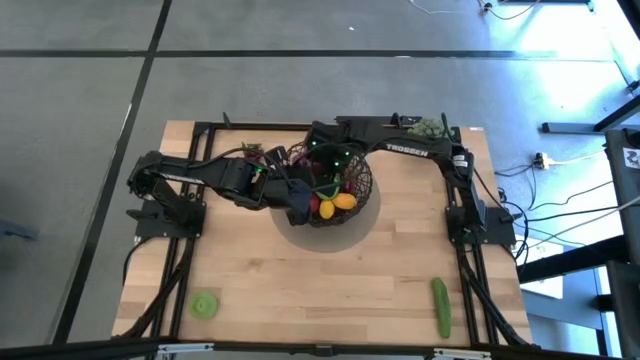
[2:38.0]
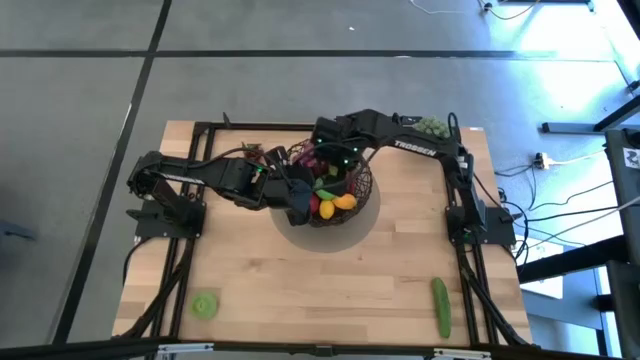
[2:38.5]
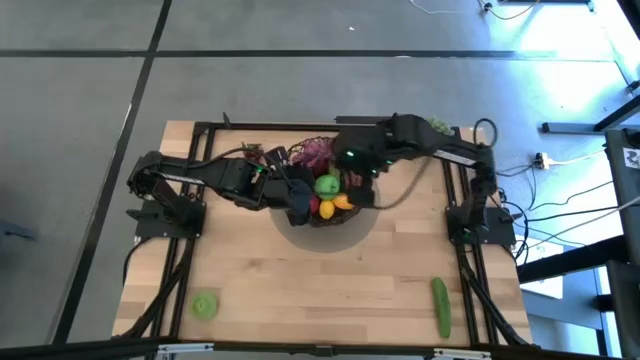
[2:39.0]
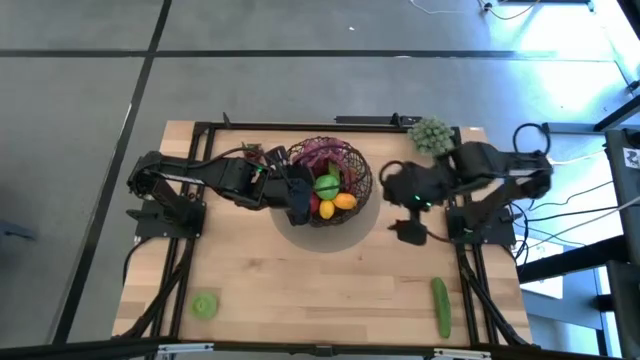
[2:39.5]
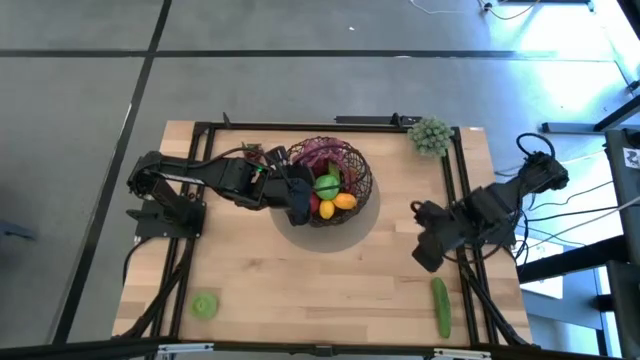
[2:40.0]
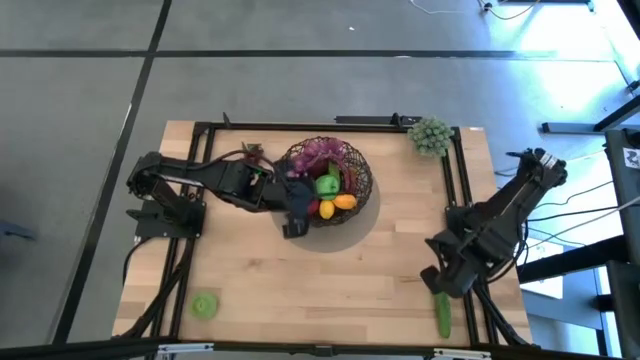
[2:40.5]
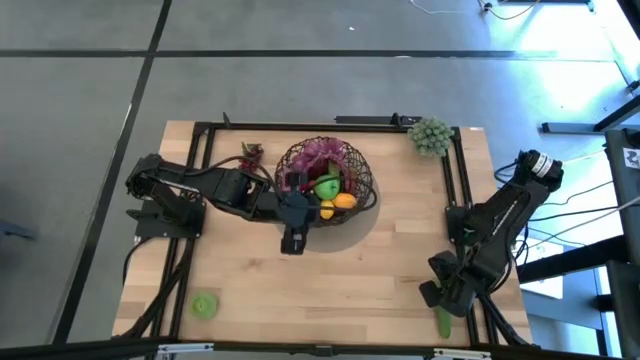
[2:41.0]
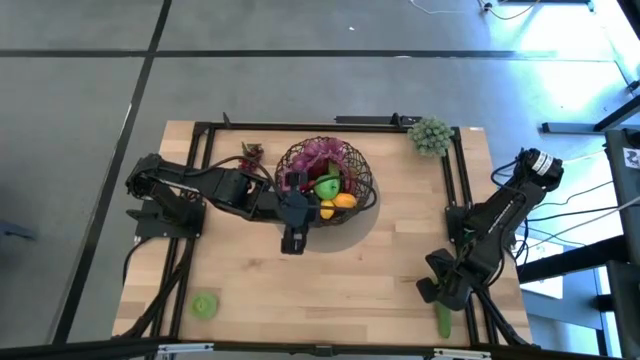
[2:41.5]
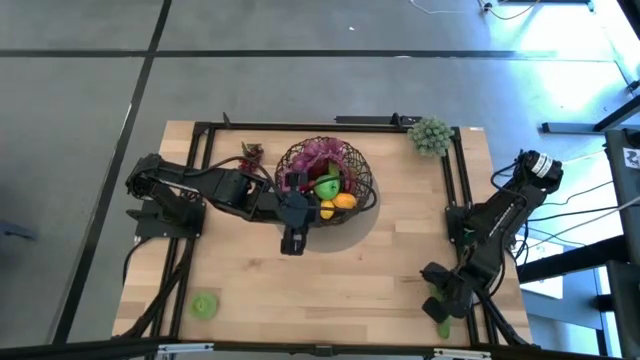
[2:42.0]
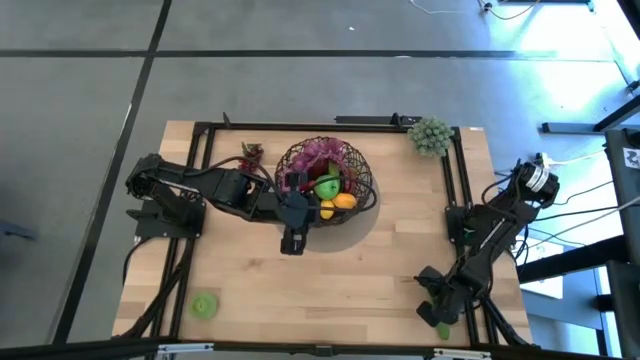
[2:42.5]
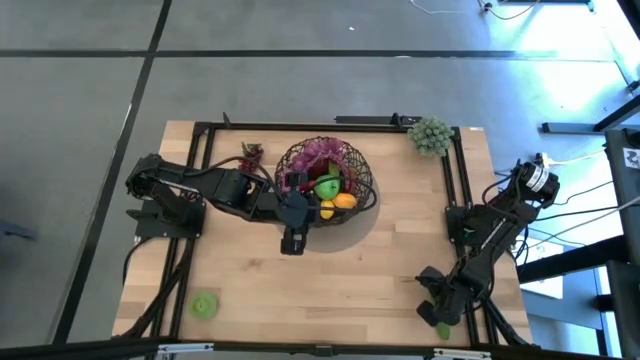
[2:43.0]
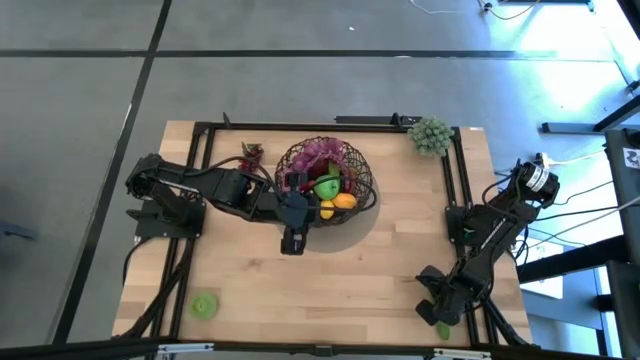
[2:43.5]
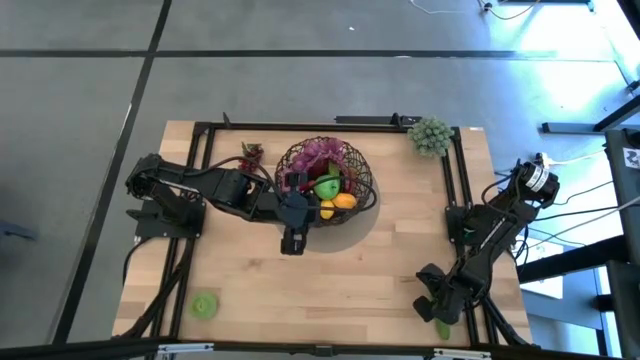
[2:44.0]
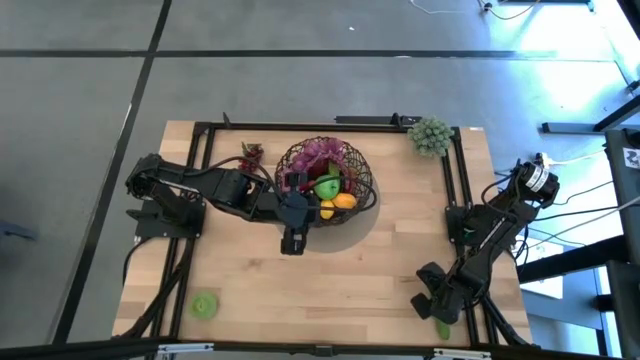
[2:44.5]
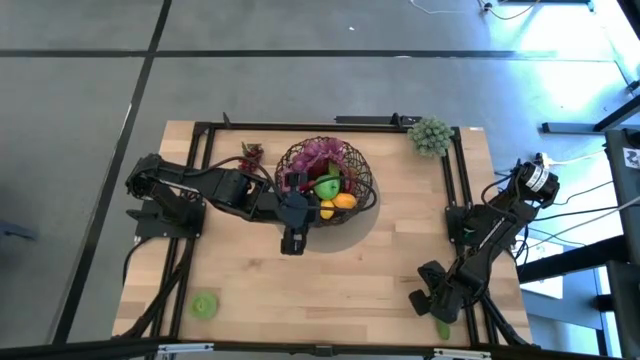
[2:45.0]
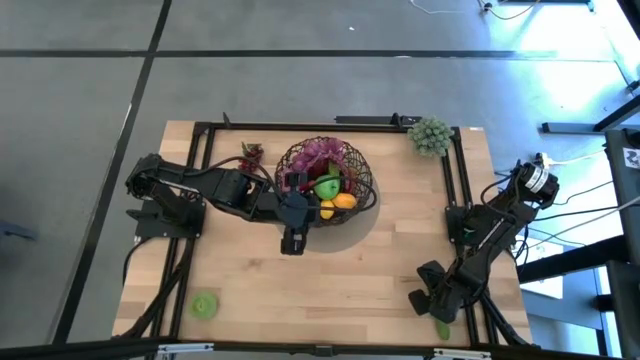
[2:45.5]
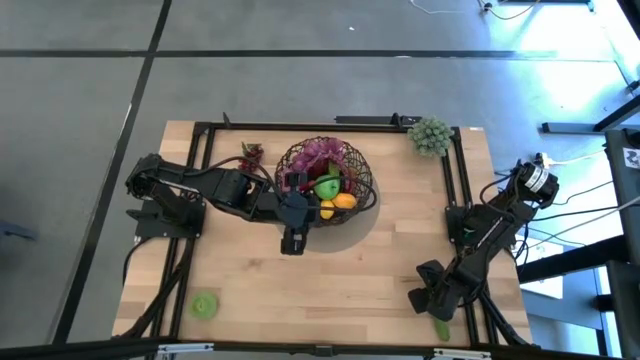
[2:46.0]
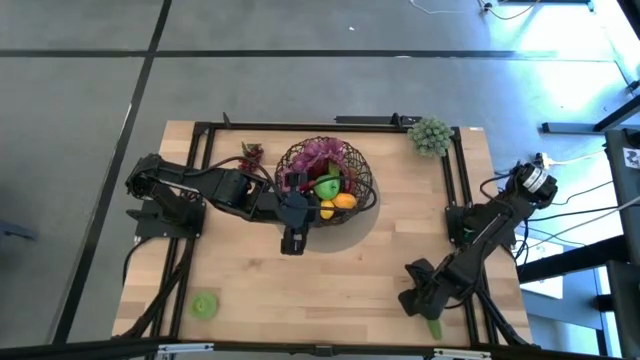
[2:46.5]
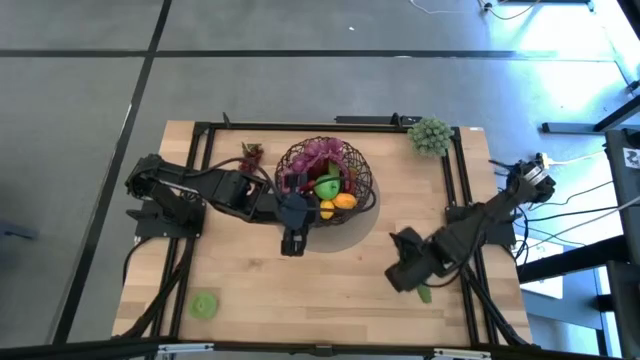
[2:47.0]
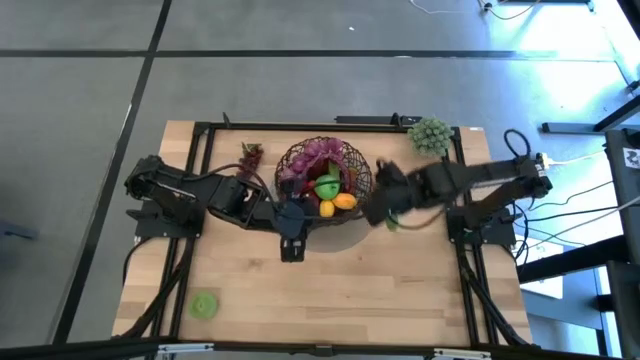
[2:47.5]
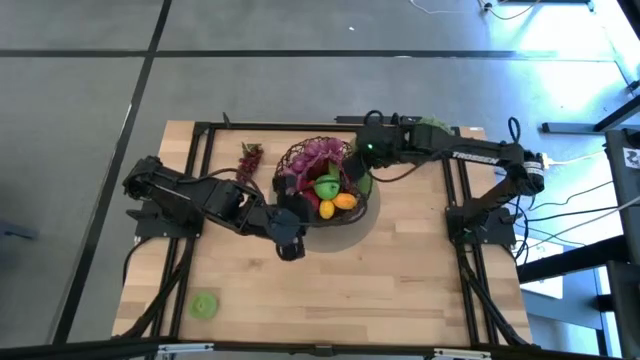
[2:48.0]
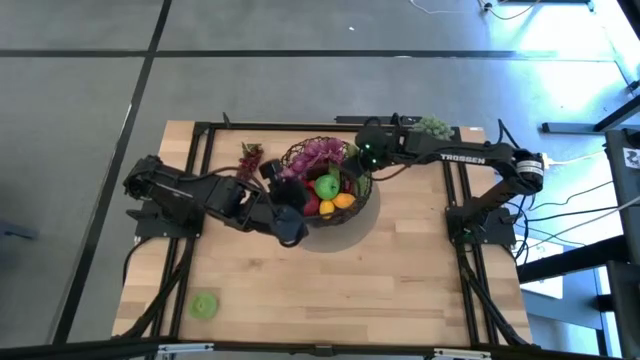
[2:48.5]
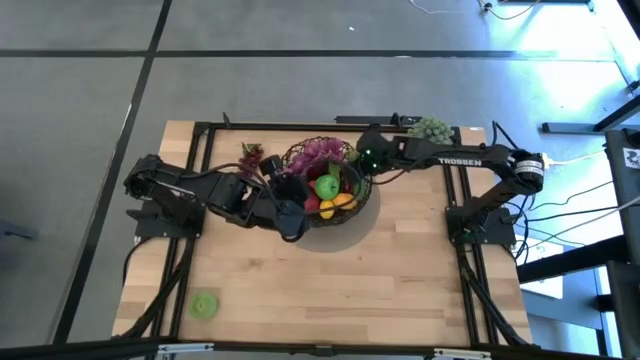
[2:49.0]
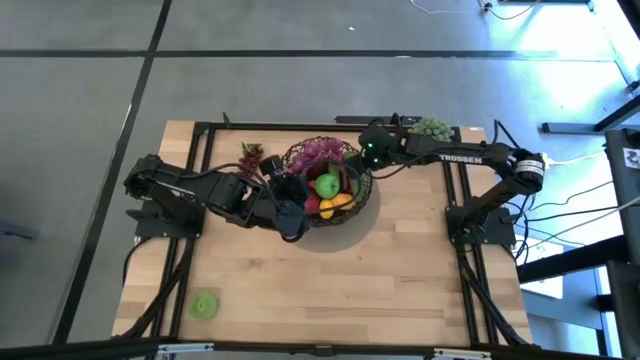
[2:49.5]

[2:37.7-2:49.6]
Task: Build produce basket
Put the cucumber into the wire basket
